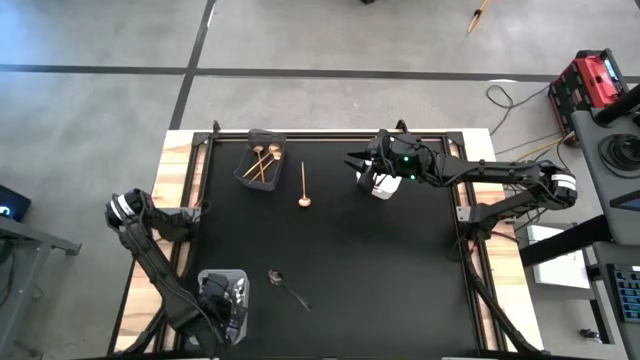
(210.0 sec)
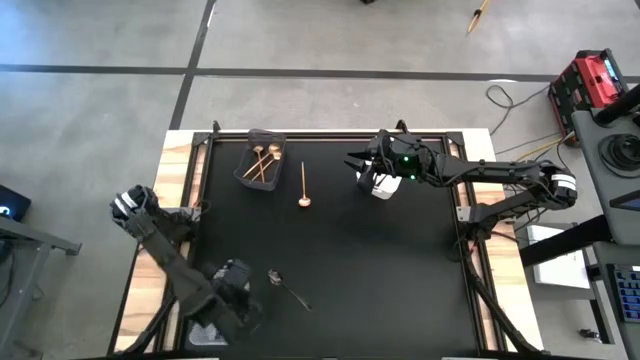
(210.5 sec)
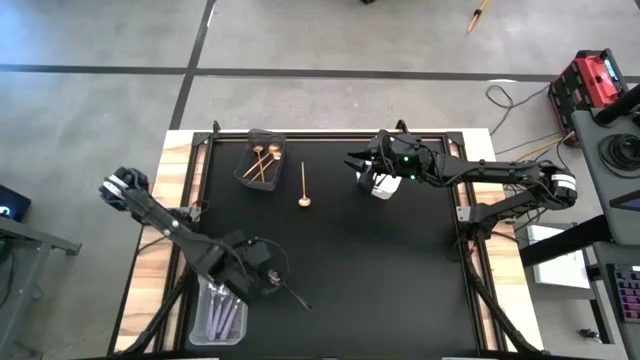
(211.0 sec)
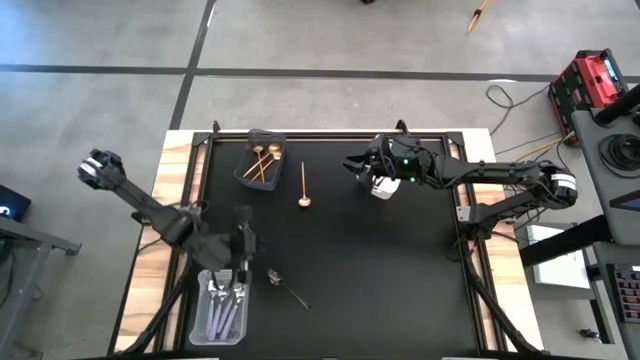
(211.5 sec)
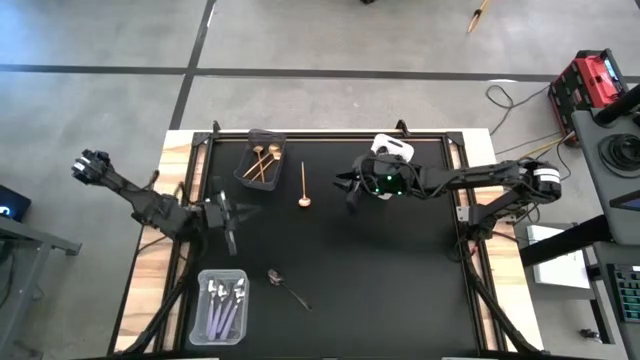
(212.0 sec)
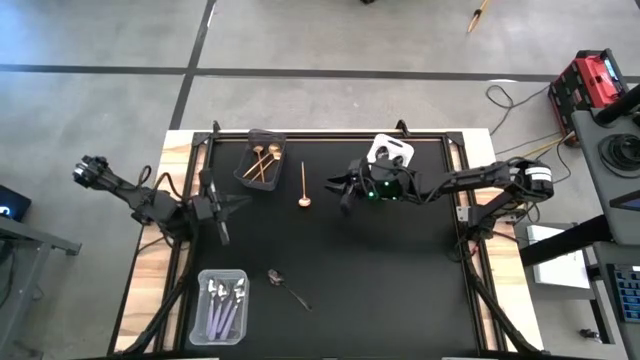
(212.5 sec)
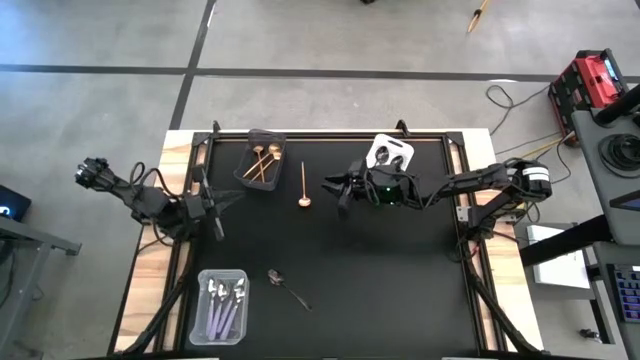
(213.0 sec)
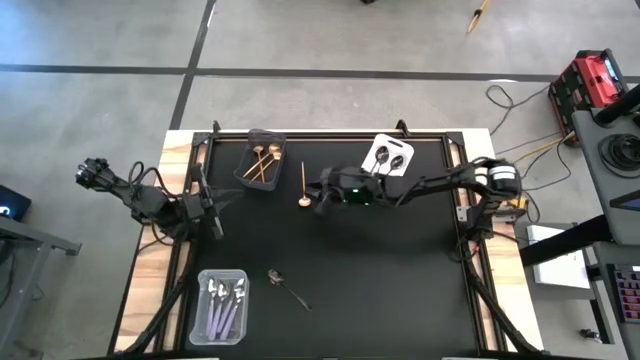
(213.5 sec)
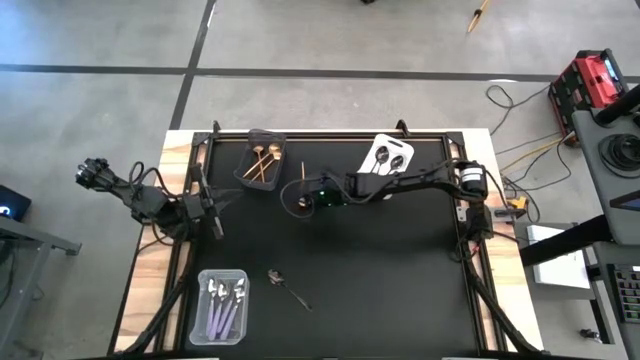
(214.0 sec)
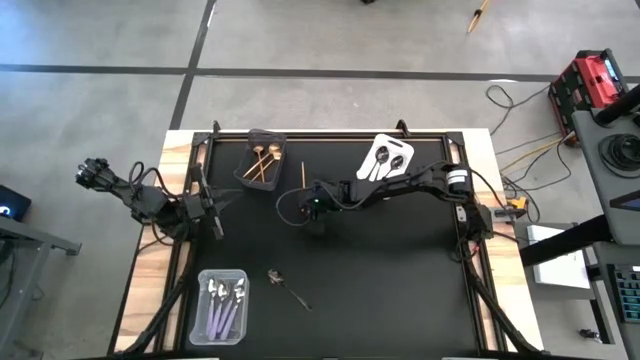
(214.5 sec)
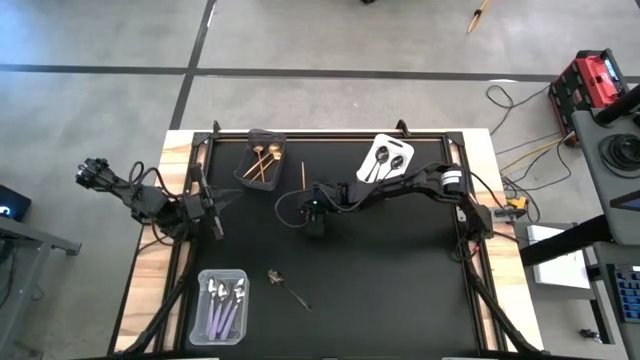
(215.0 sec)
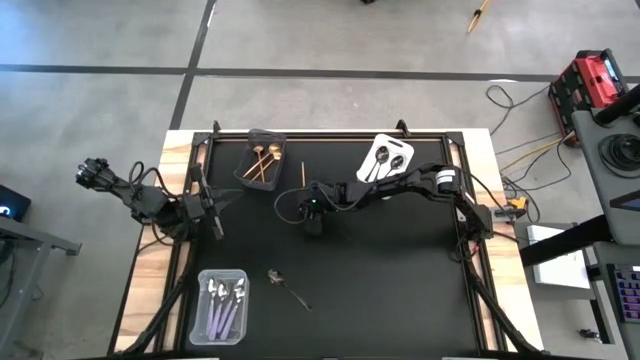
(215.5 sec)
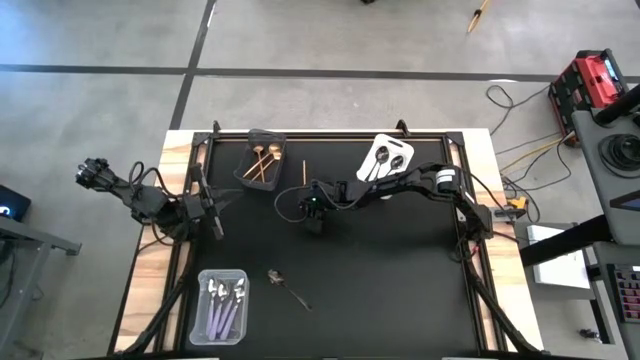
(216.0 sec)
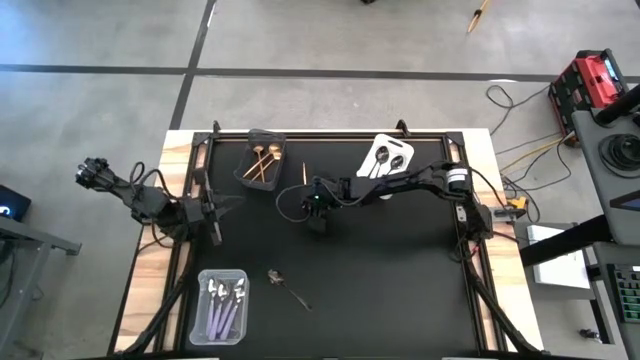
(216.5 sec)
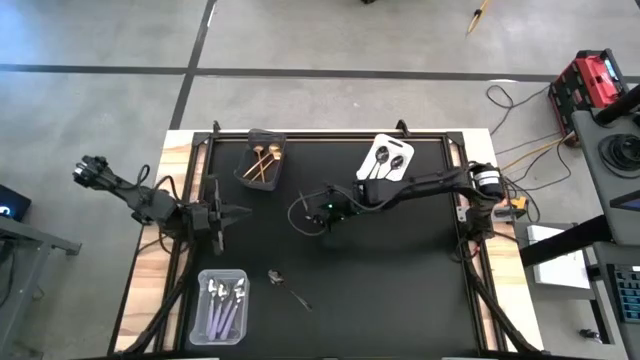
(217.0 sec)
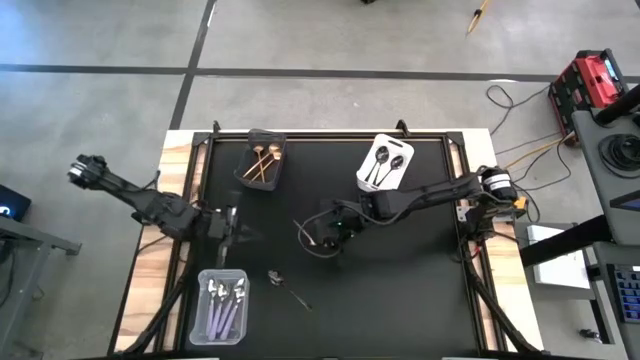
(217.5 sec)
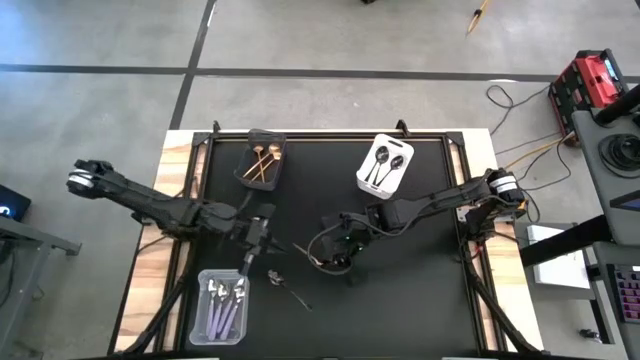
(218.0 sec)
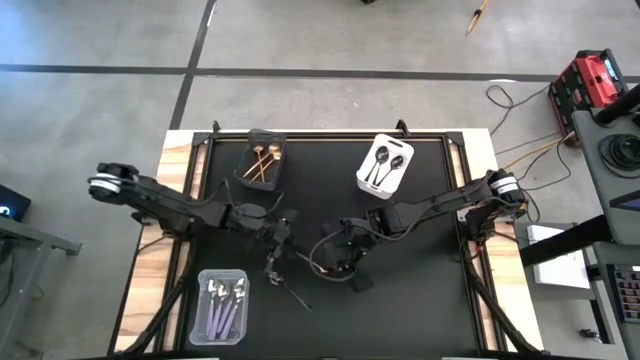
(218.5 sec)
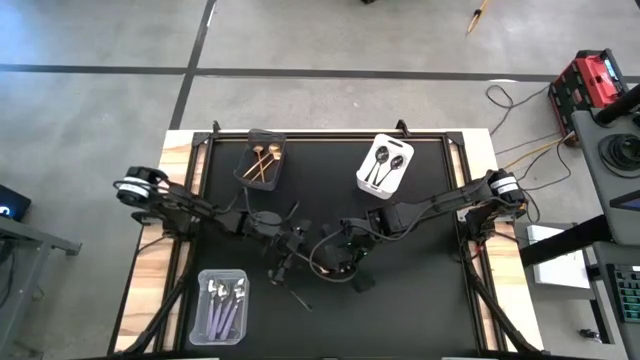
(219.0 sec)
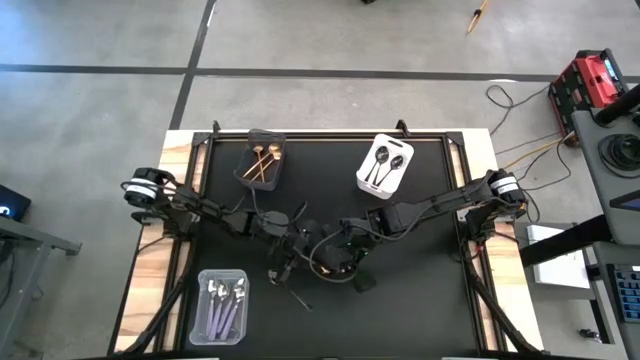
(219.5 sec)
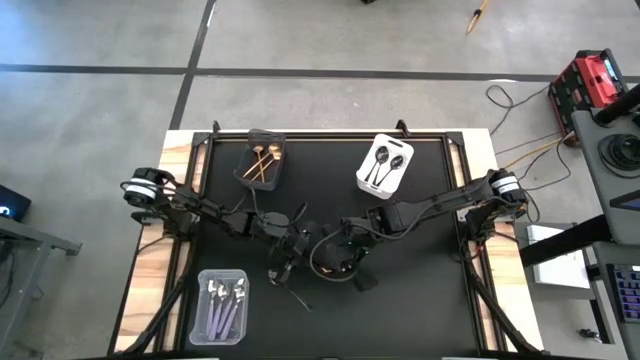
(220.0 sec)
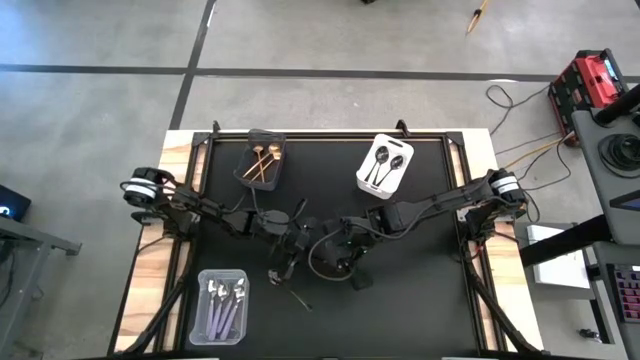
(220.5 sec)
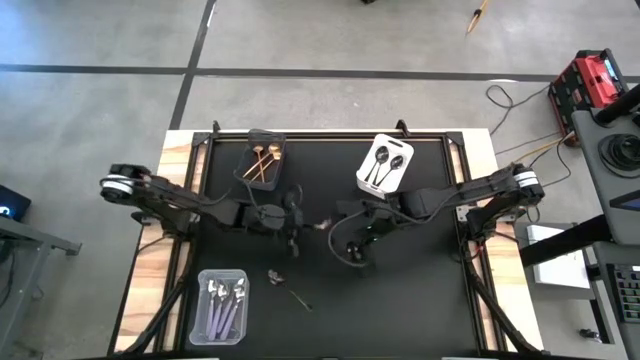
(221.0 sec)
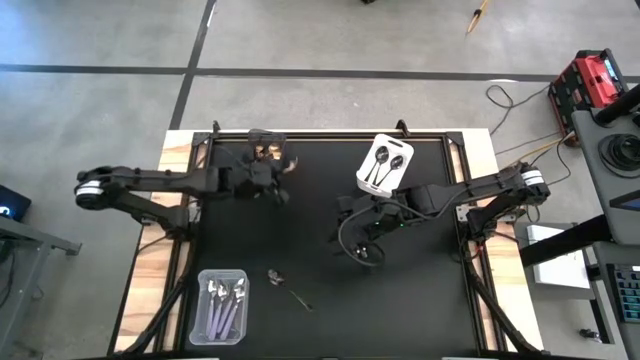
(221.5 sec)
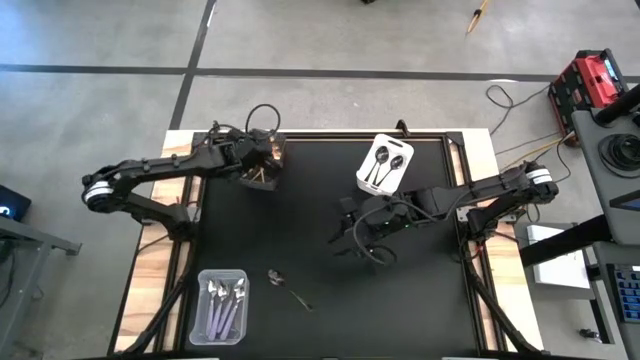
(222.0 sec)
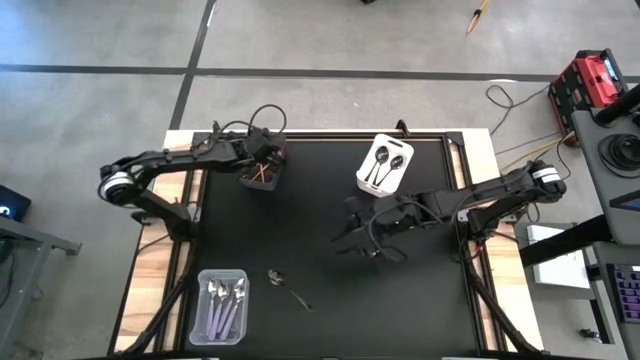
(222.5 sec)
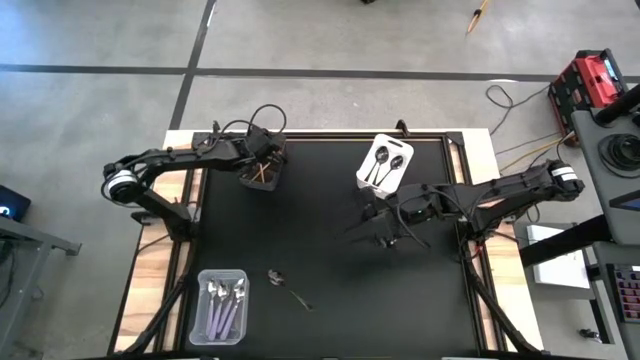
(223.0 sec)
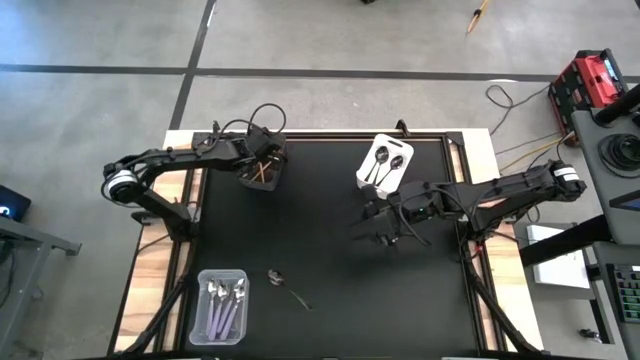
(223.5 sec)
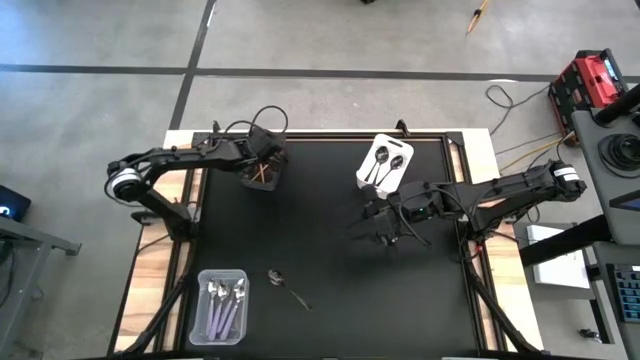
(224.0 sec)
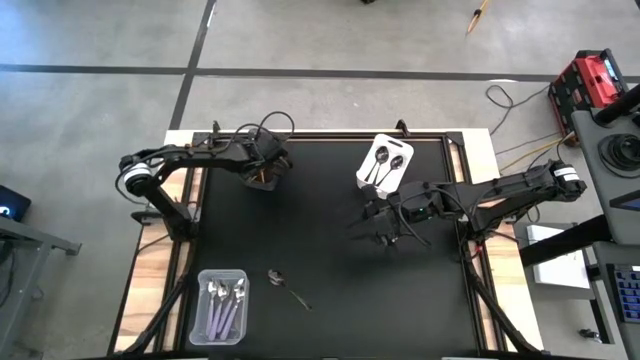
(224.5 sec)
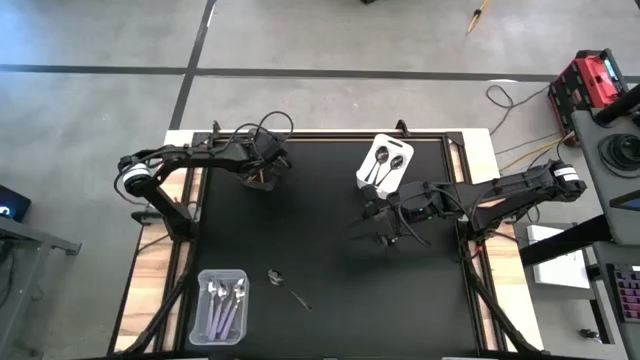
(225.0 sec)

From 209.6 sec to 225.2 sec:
Task: Sort silverware by color (type)
Put the gold spoon into the black bin

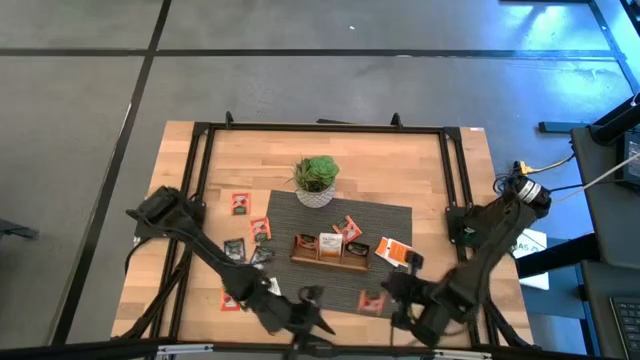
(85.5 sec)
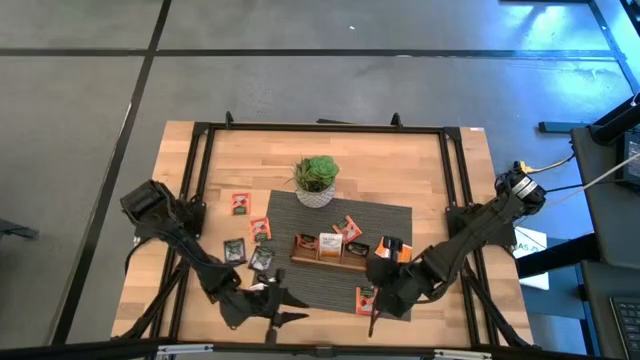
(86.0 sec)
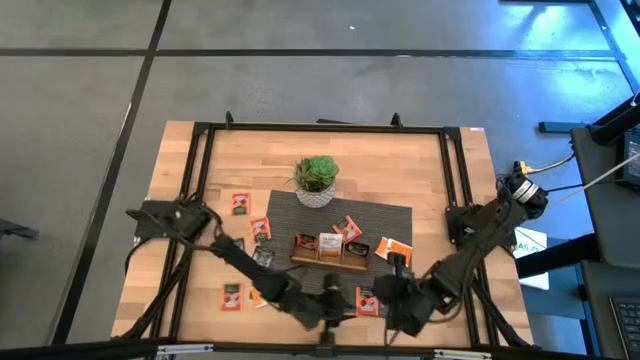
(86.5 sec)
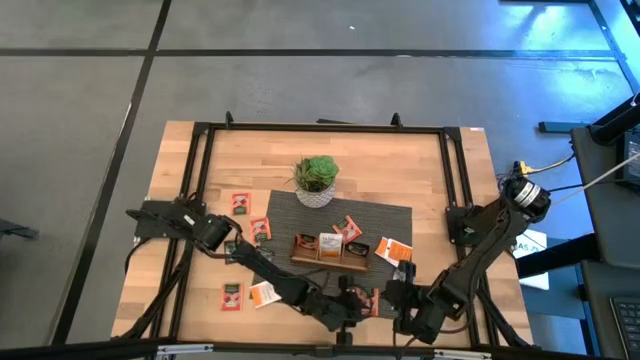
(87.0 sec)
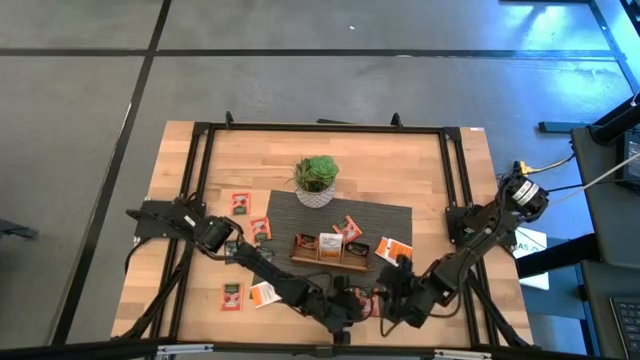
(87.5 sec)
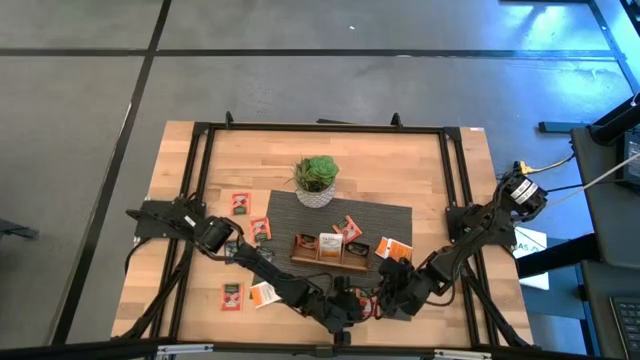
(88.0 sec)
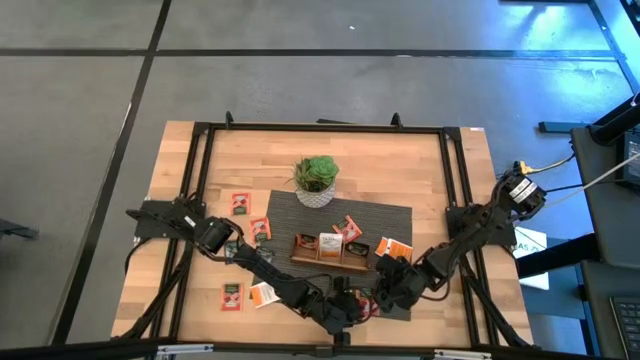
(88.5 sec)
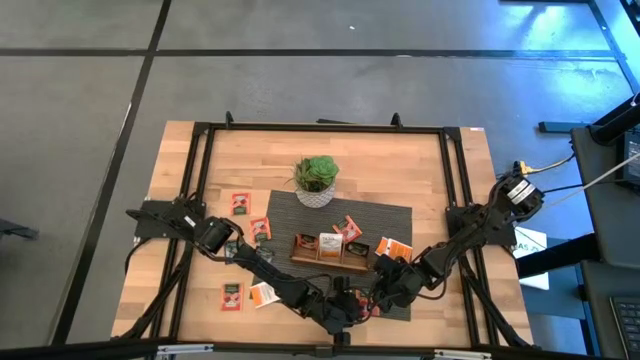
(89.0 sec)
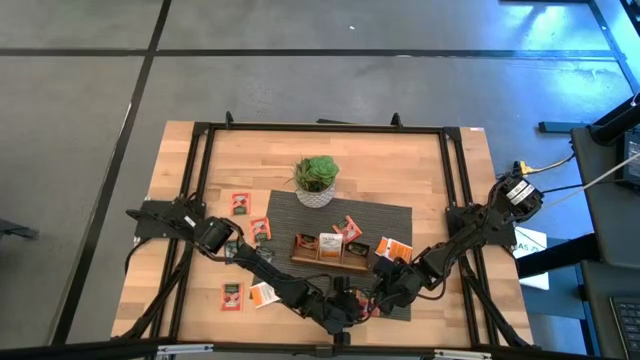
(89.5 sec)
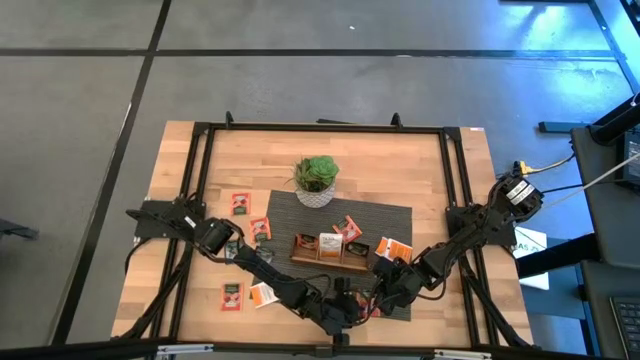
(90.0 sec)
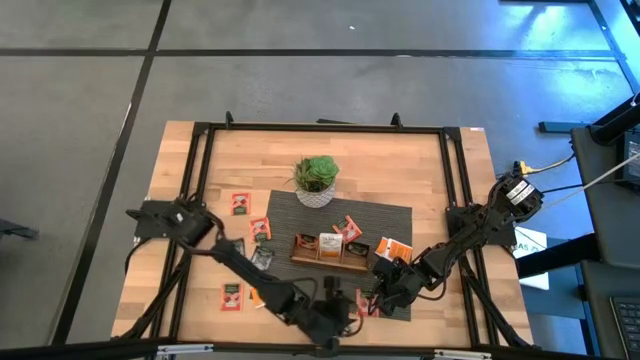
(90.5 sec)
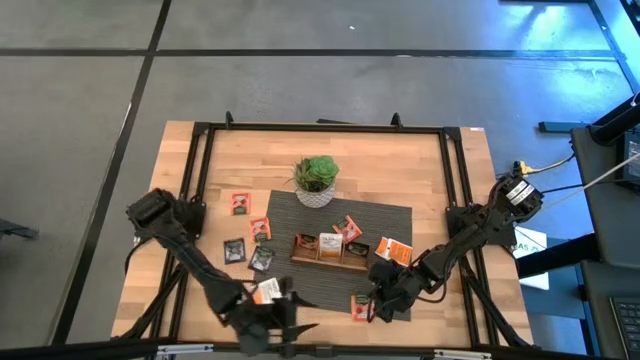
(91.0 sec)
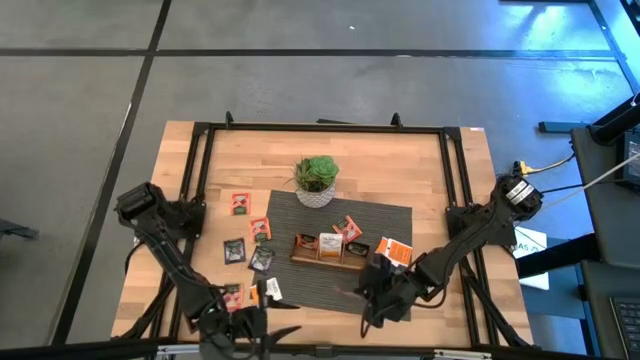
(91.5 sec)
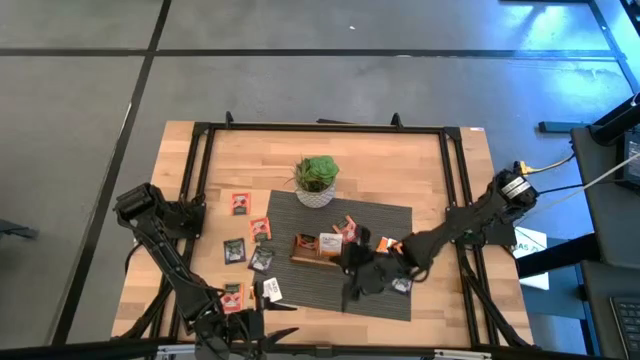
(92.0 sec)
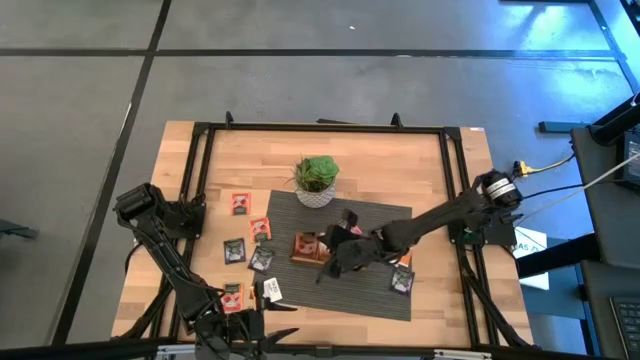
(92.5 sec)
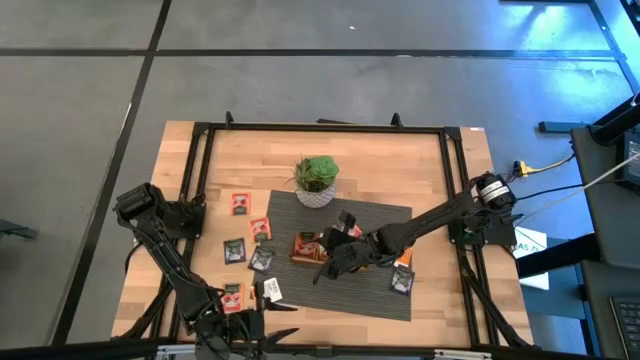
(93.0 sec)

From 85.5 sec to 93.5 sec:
Task: Pick & Place Tea
Put the orange tea bag into the left section of the wooden organizer
